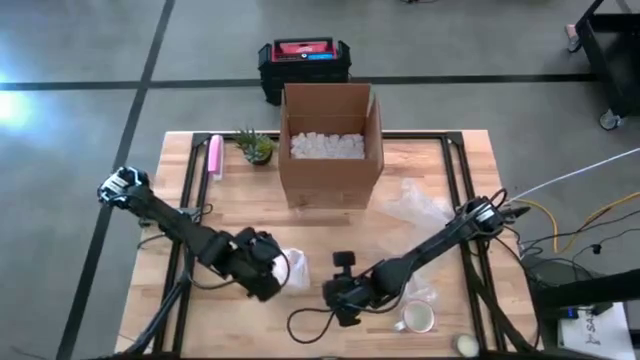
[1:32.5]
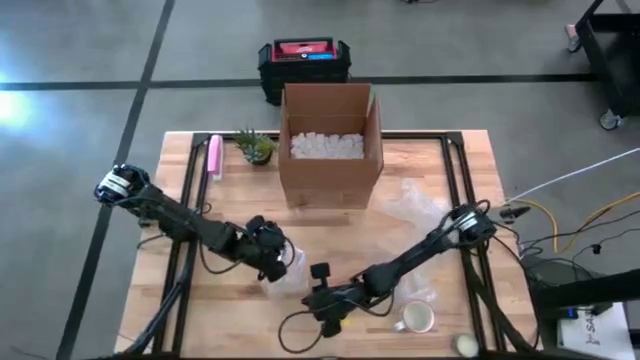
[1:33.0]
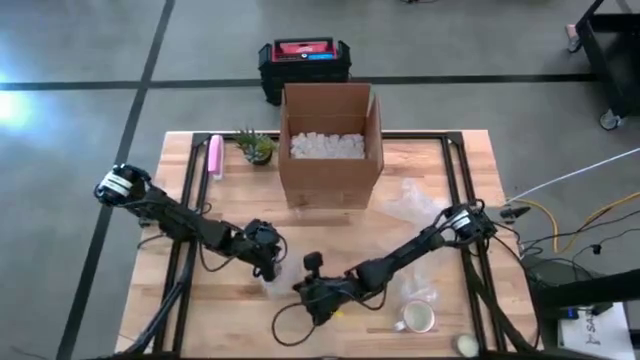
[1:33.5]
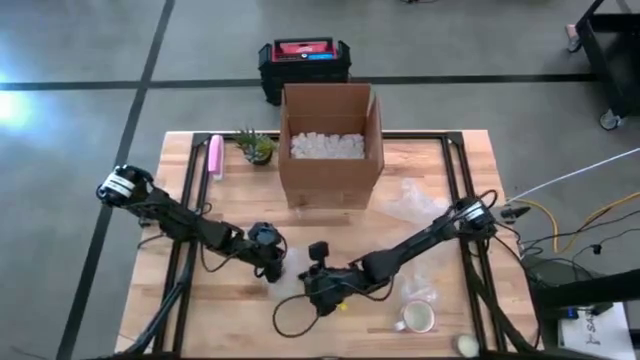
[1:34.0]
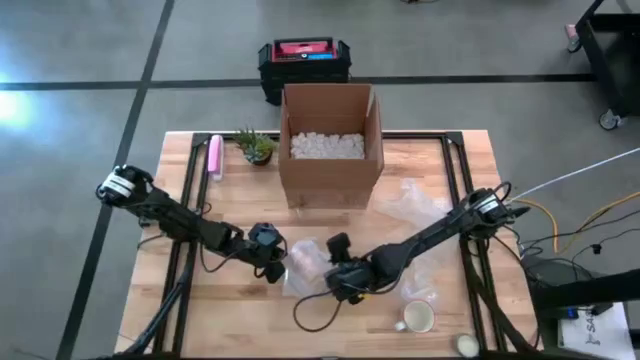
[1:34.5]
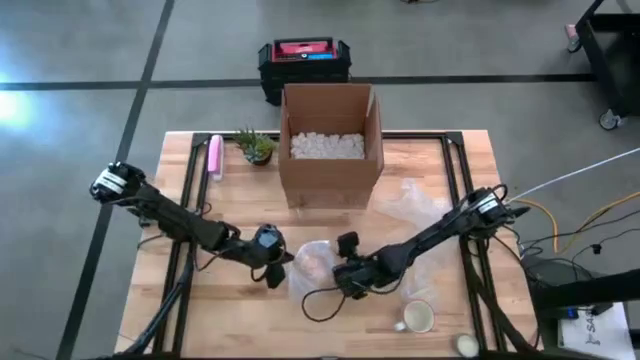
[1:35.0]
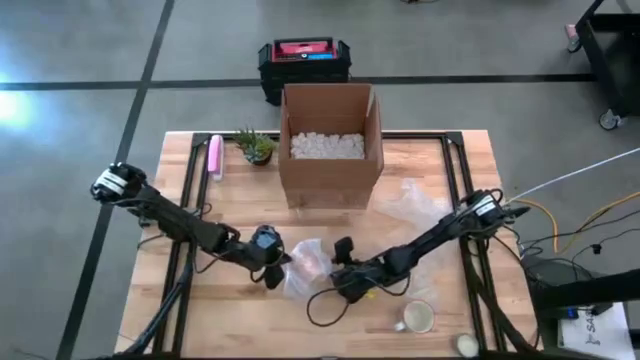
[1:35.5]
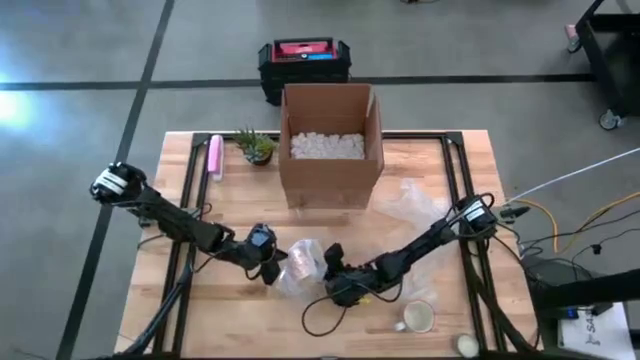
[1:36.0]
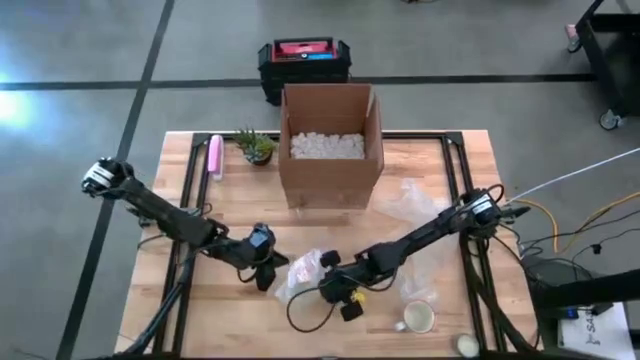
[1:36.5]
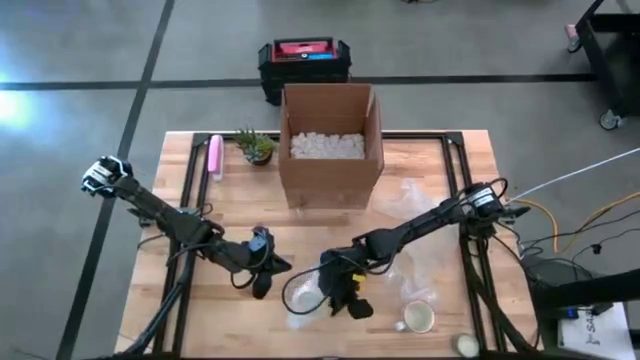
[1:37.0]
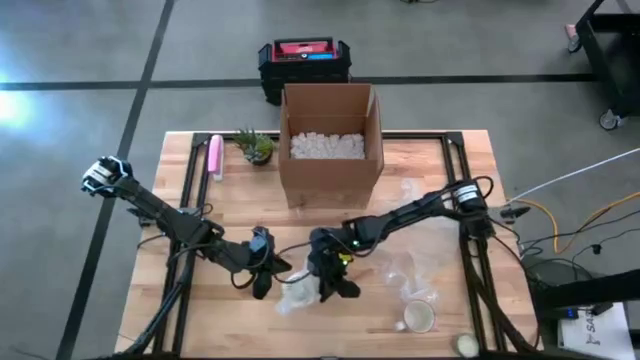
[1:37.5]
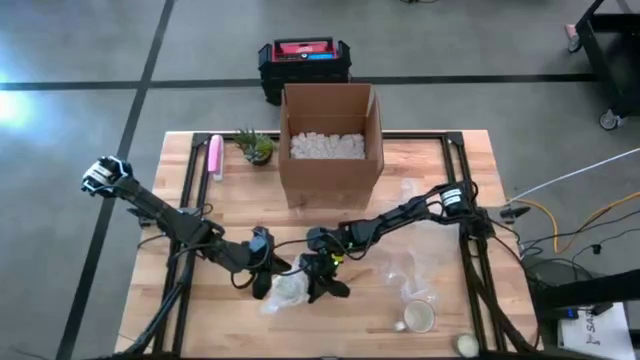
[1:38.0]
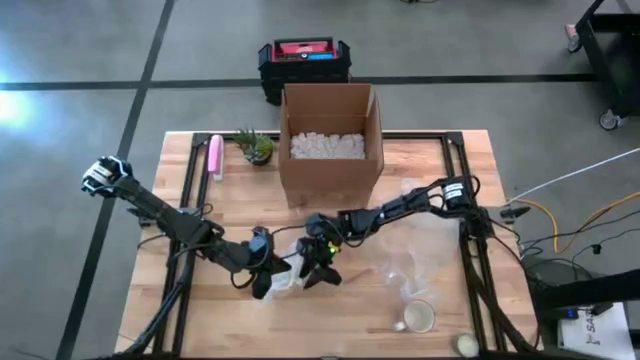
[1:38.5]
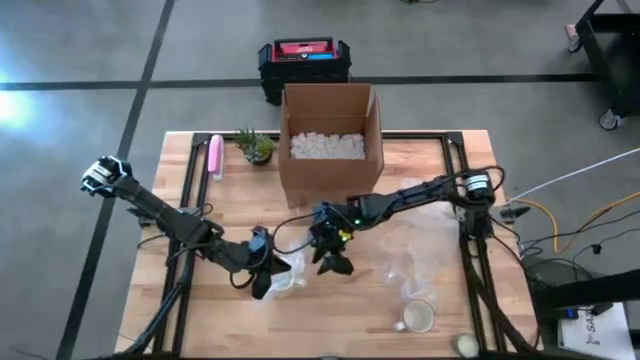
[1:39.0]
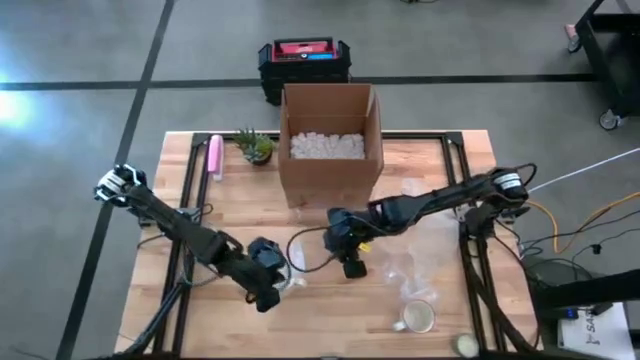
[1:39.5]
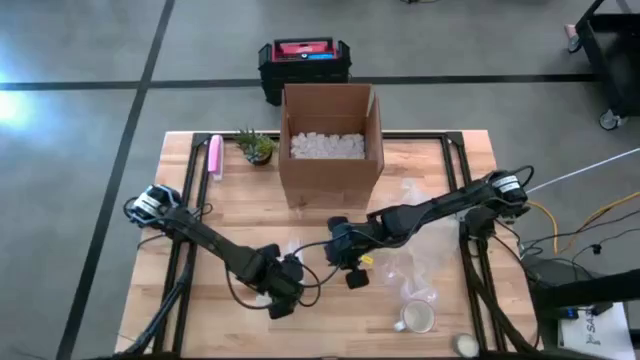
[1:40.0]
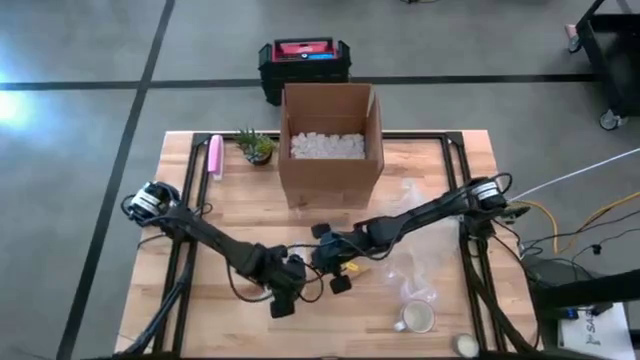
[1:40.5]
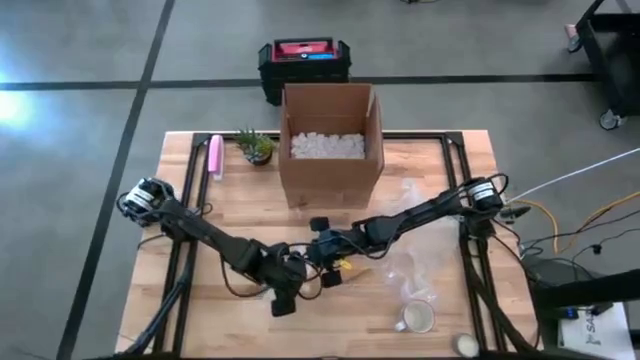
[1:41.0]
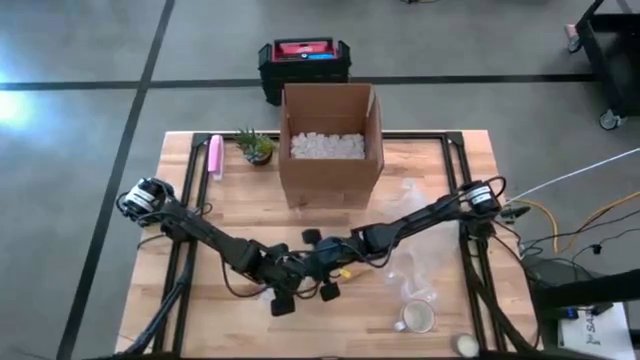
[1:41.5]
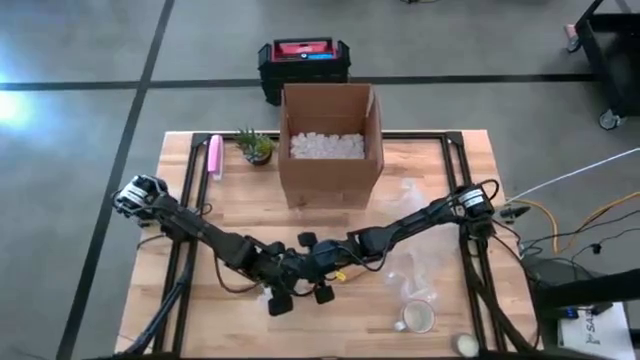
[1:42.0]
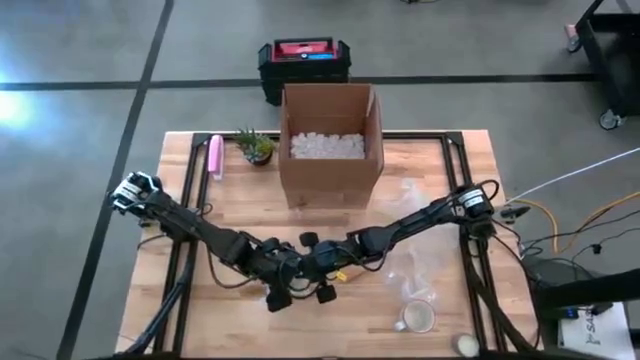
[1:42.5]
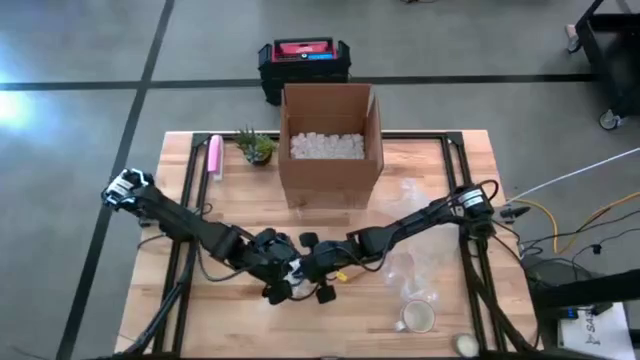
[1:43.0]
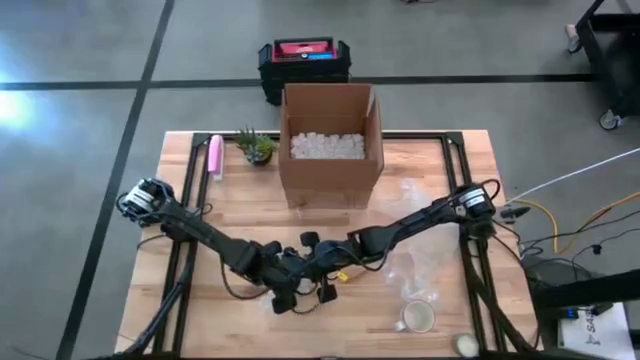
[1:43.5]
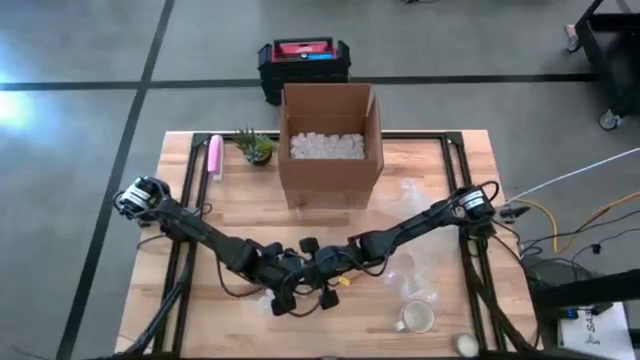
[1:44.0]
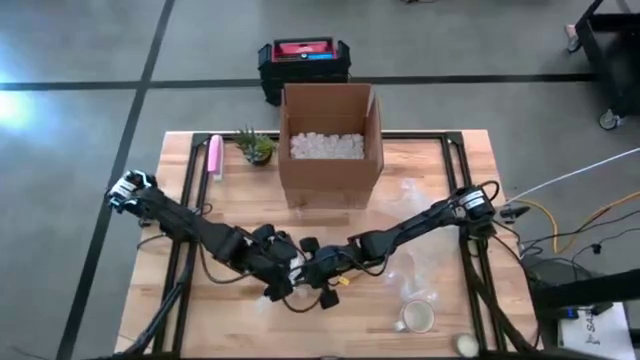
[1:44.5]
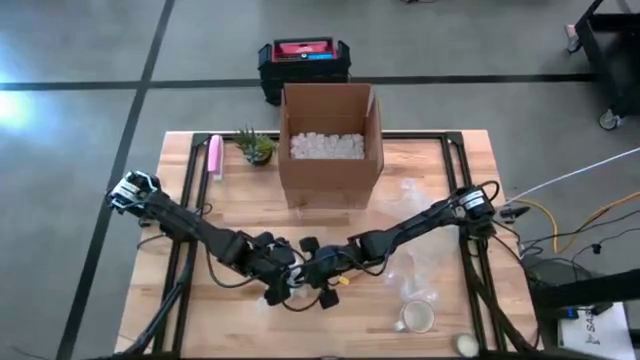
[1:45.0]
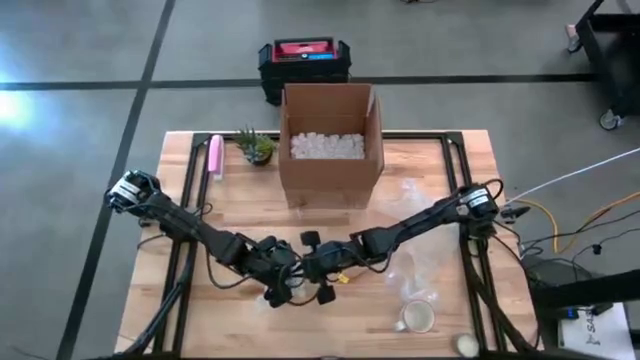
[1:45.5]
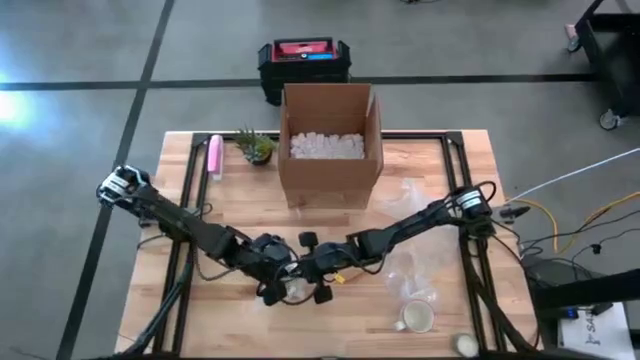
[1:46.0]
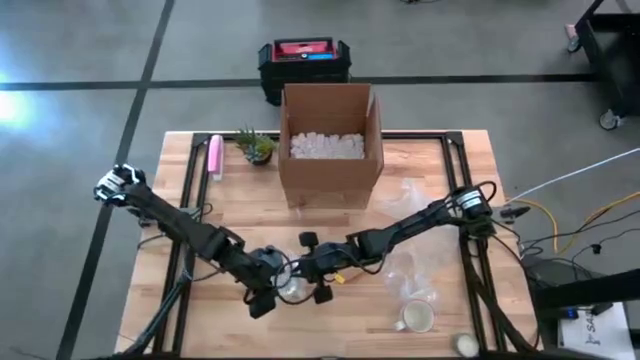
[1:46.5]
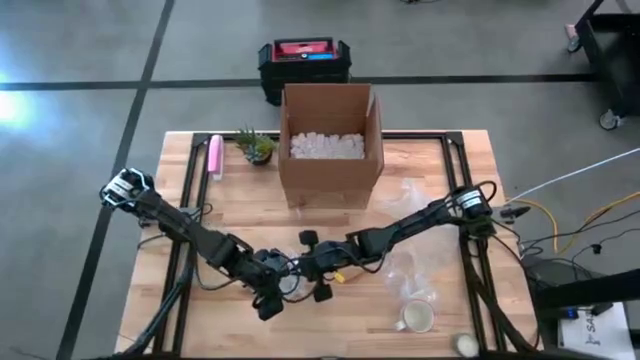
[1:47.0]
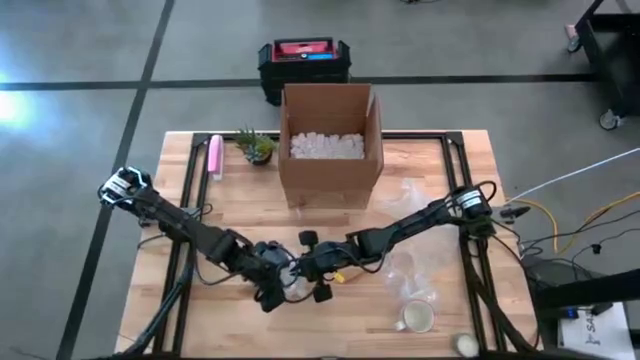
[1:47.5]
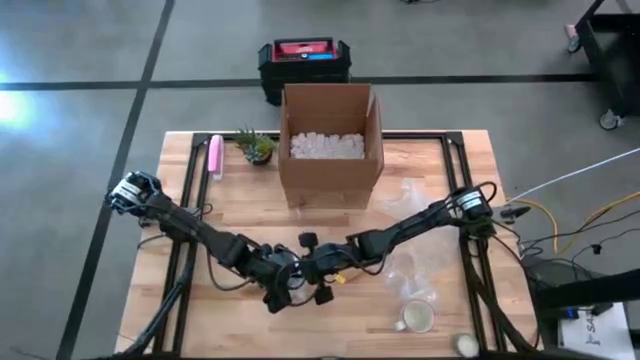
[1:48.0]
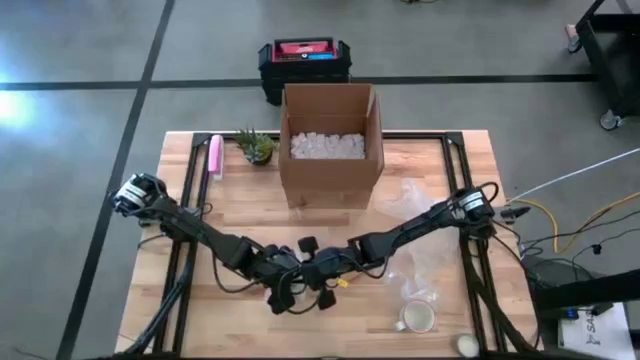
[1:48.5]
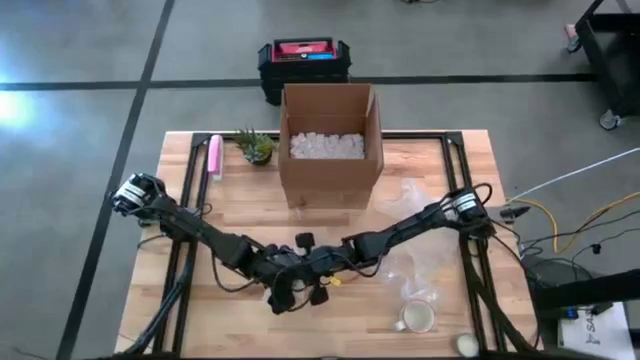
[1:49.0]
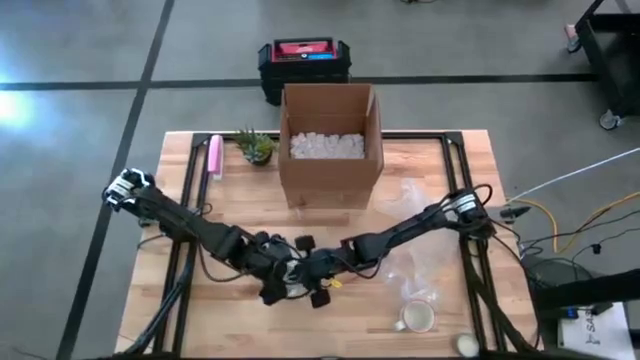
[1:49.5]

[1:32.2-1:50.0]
Task: wrap mug
Wrap the orange mug with the bubble wrap

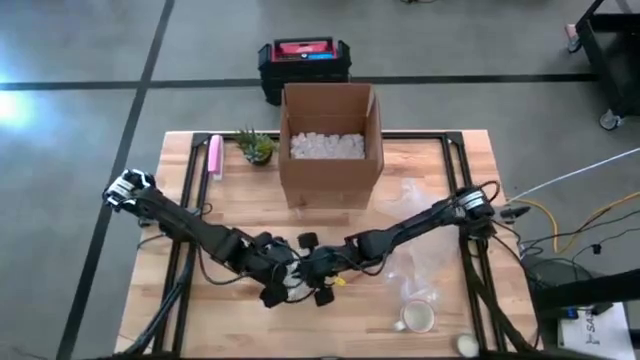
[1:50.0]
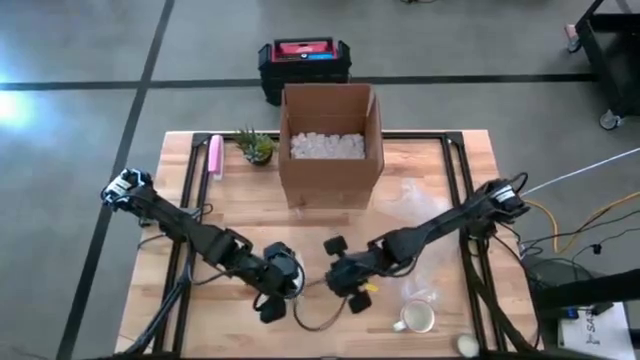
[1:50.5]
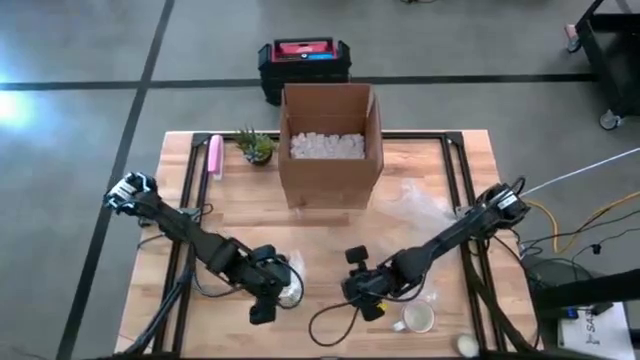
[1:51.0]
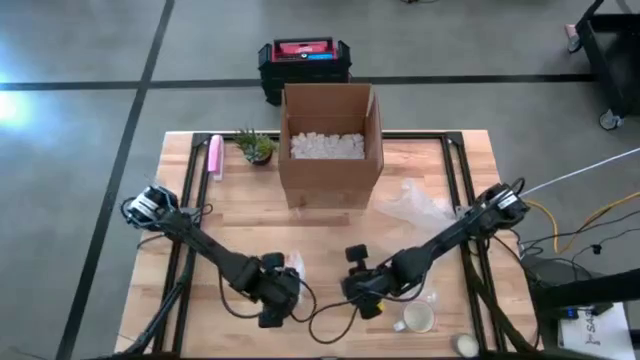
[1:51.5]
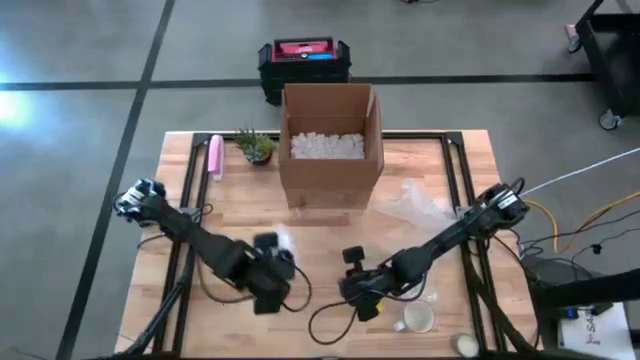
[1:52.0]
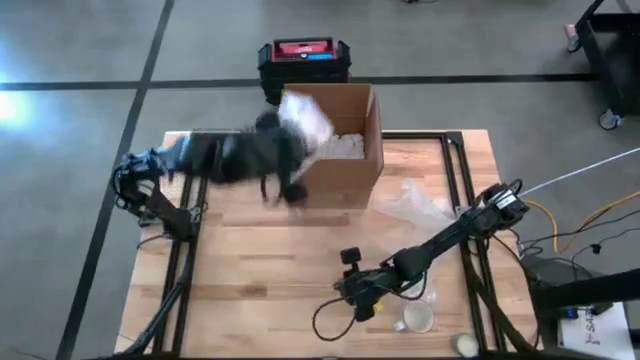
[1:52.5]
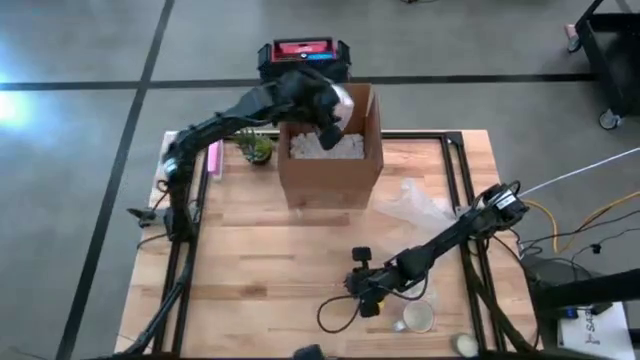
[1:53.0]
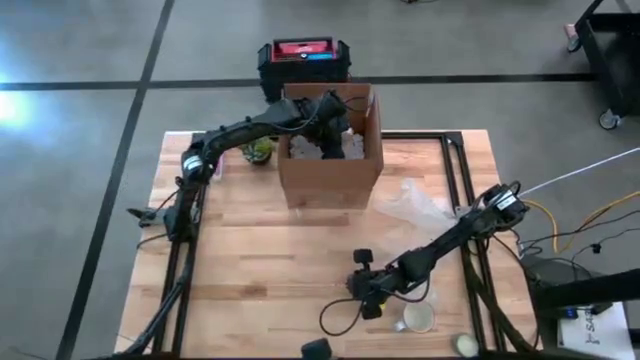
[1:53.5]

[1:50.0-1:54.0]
Put the wrapped orange mug into the cardboard box
